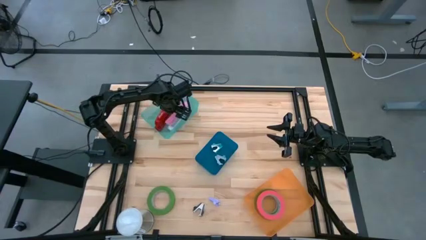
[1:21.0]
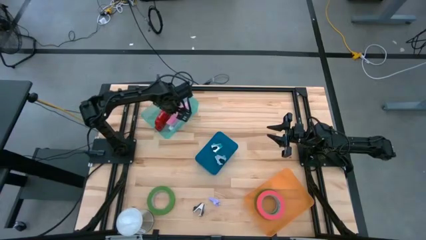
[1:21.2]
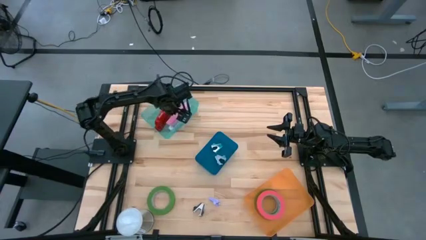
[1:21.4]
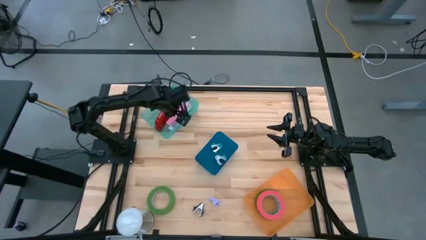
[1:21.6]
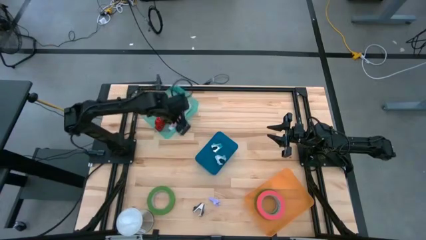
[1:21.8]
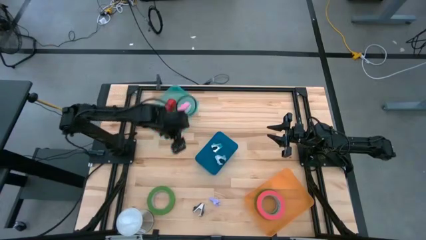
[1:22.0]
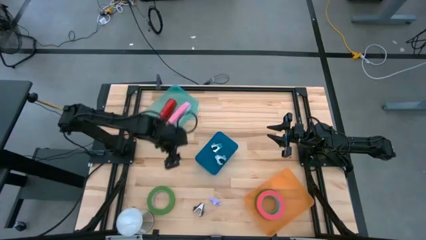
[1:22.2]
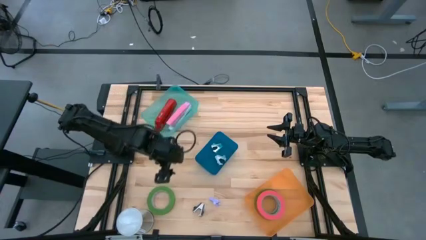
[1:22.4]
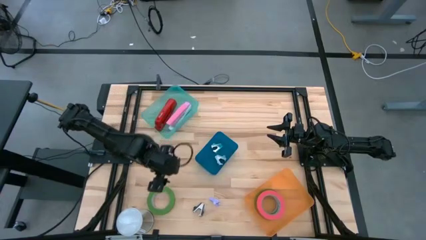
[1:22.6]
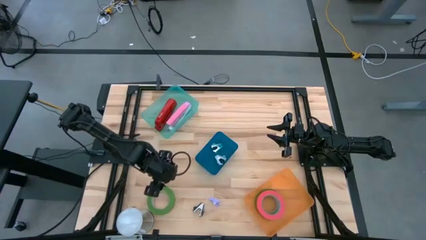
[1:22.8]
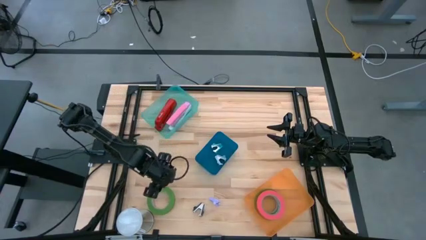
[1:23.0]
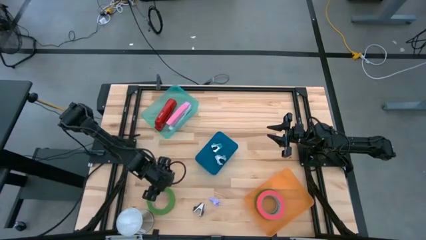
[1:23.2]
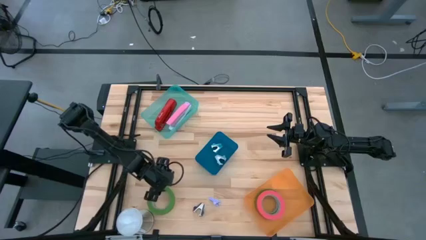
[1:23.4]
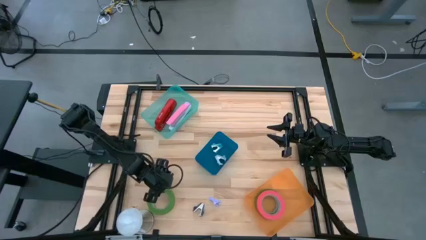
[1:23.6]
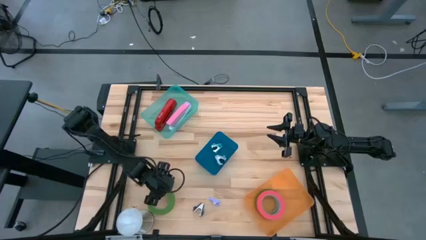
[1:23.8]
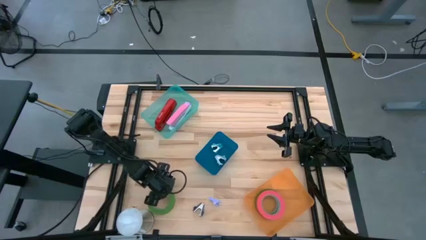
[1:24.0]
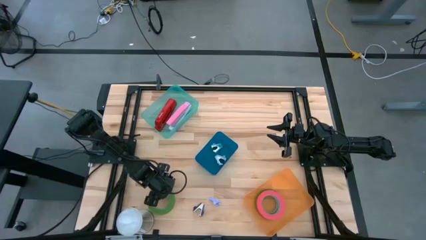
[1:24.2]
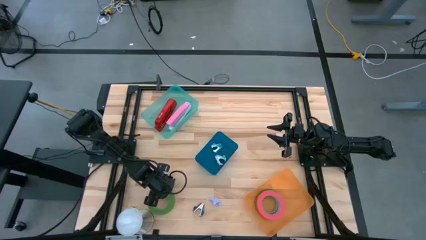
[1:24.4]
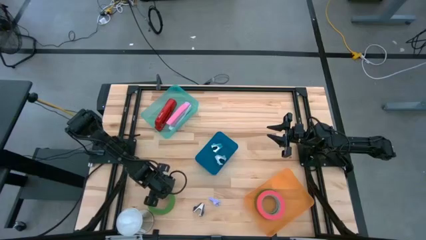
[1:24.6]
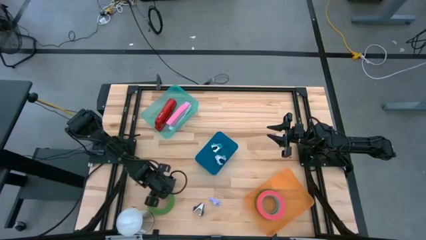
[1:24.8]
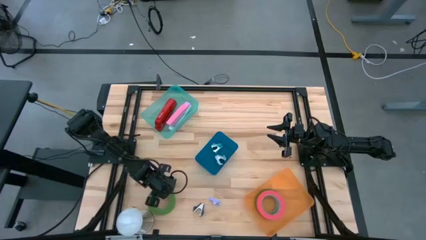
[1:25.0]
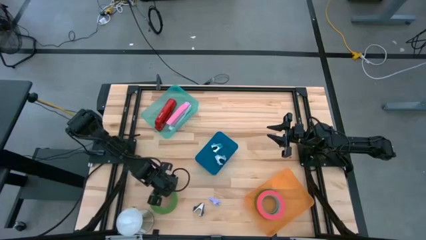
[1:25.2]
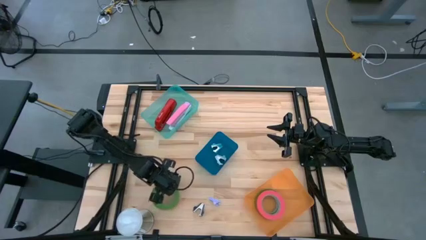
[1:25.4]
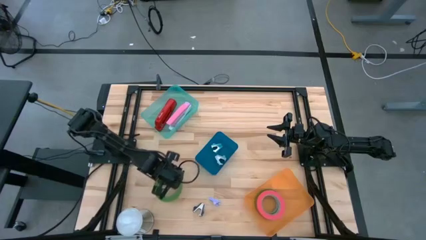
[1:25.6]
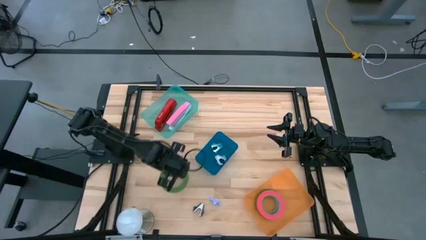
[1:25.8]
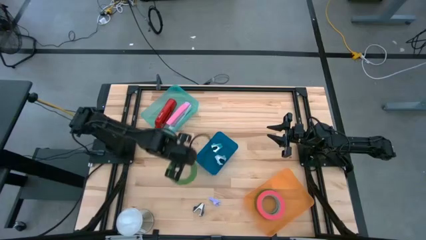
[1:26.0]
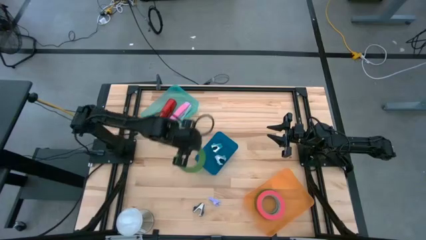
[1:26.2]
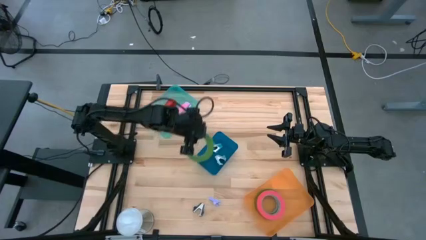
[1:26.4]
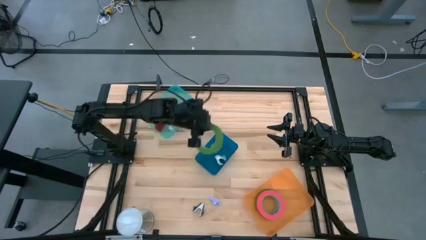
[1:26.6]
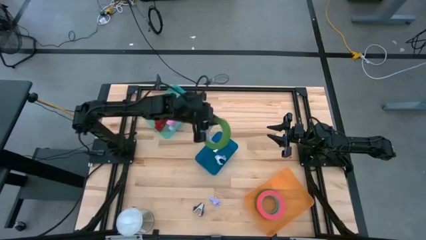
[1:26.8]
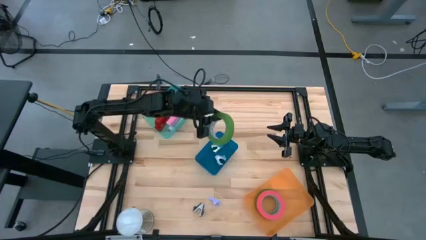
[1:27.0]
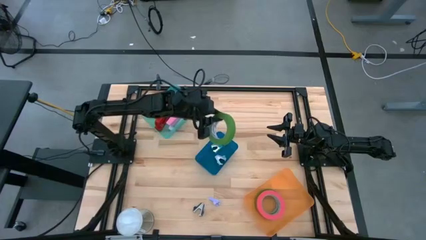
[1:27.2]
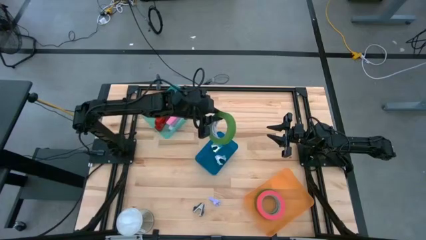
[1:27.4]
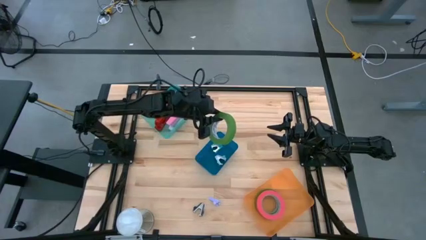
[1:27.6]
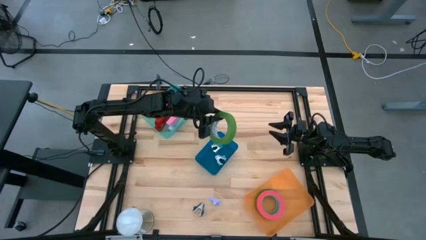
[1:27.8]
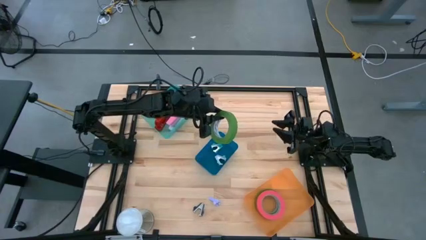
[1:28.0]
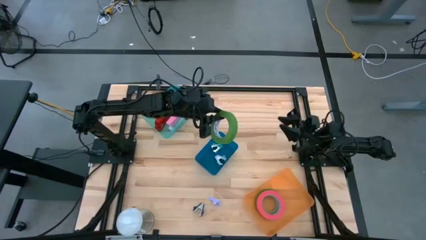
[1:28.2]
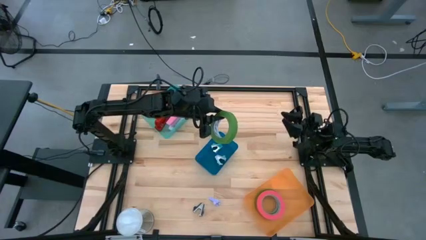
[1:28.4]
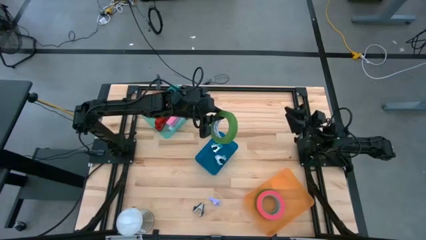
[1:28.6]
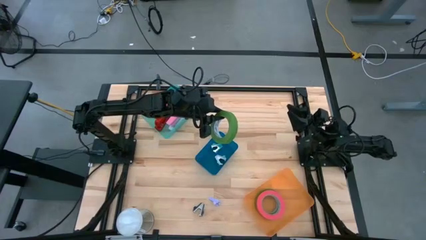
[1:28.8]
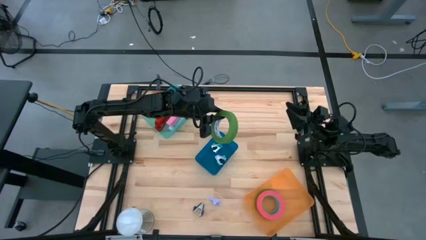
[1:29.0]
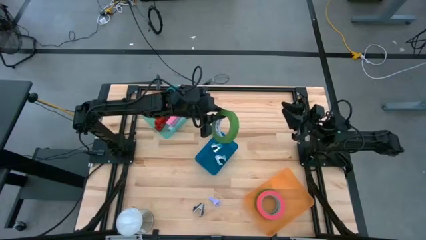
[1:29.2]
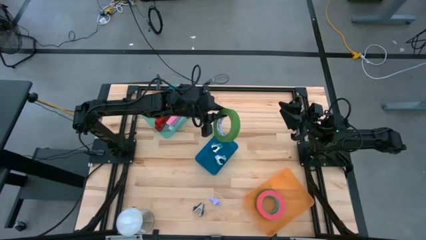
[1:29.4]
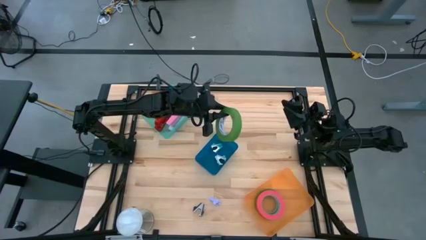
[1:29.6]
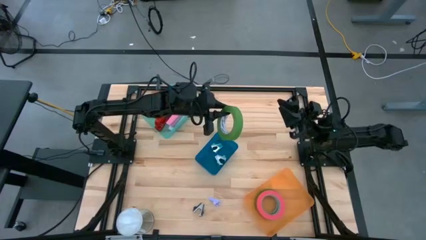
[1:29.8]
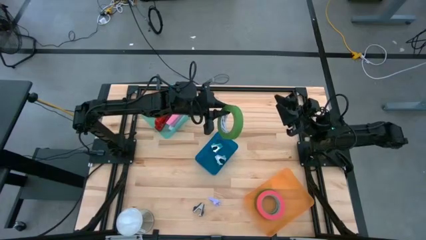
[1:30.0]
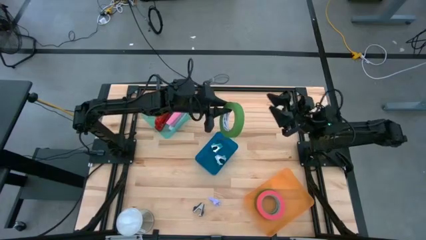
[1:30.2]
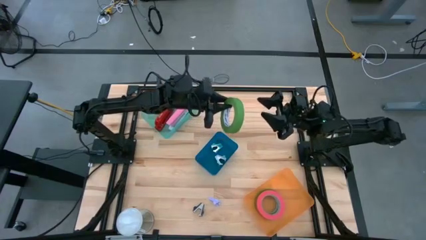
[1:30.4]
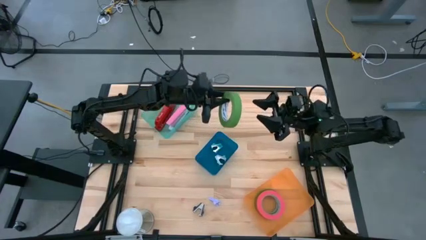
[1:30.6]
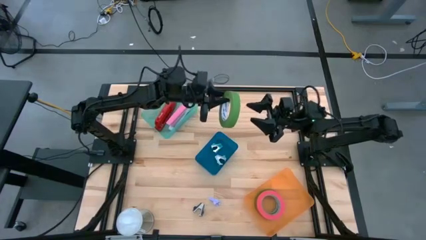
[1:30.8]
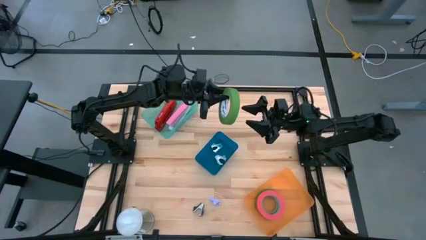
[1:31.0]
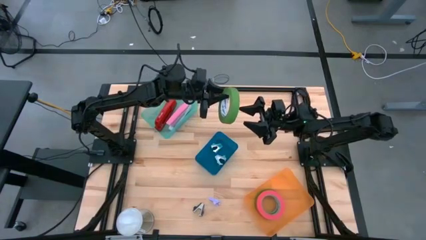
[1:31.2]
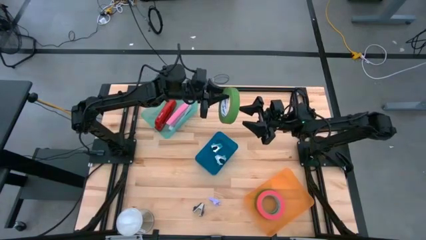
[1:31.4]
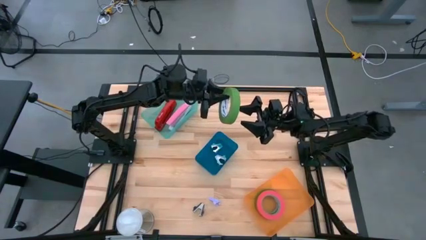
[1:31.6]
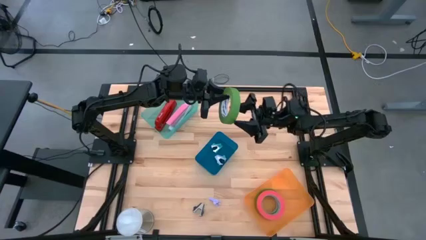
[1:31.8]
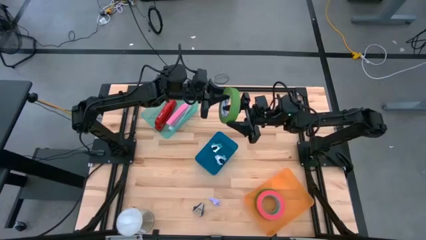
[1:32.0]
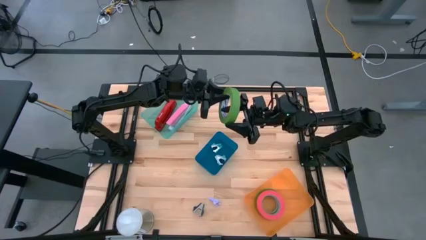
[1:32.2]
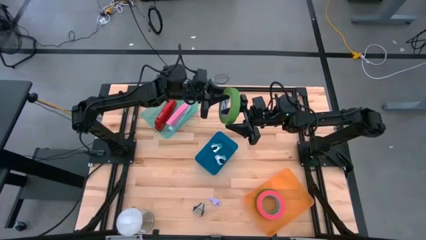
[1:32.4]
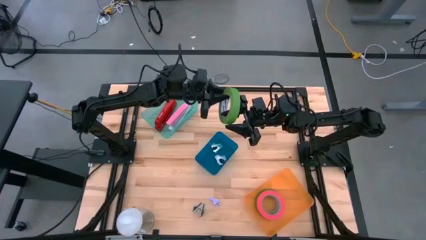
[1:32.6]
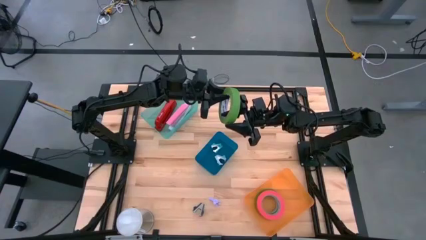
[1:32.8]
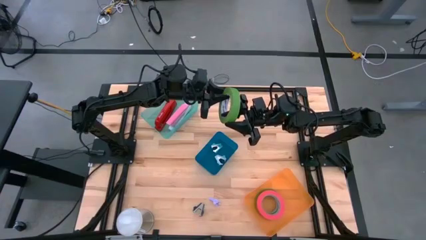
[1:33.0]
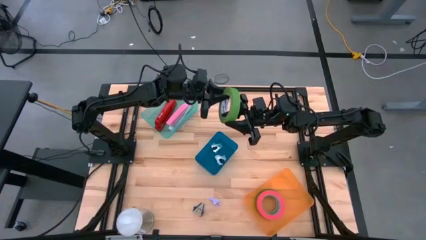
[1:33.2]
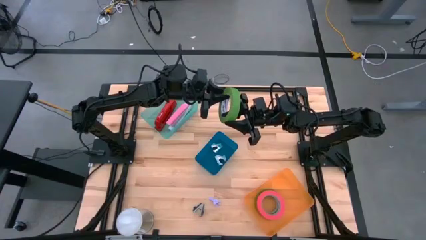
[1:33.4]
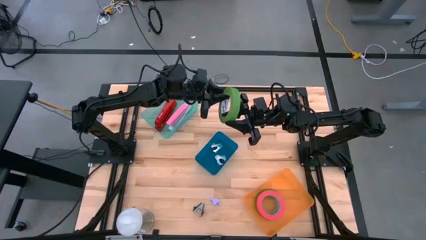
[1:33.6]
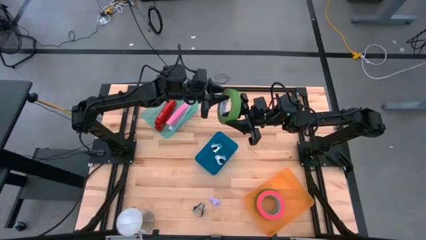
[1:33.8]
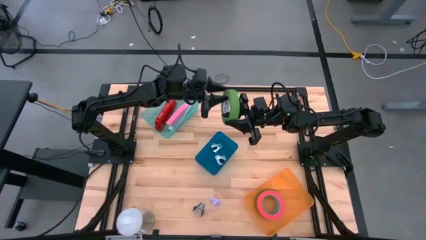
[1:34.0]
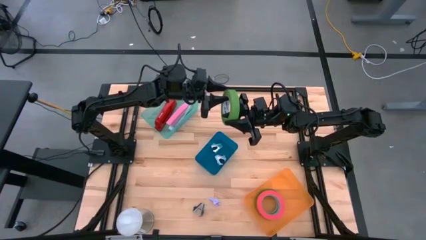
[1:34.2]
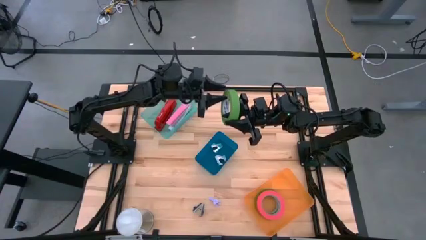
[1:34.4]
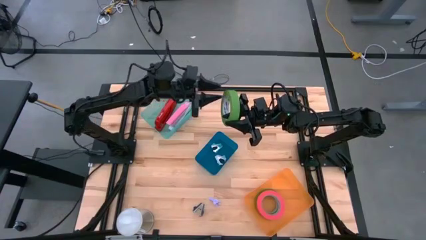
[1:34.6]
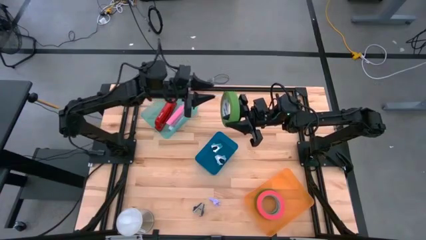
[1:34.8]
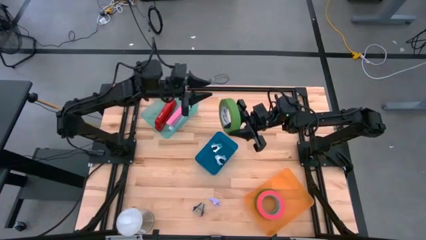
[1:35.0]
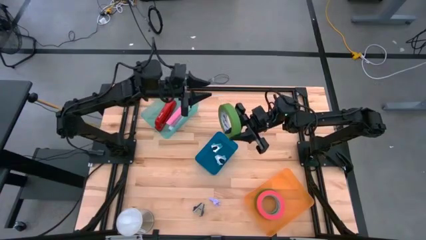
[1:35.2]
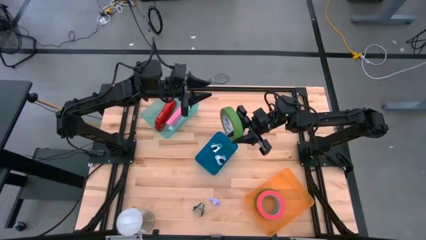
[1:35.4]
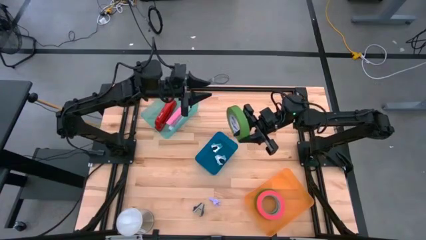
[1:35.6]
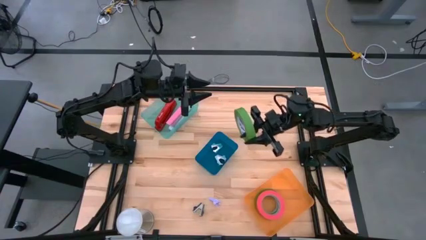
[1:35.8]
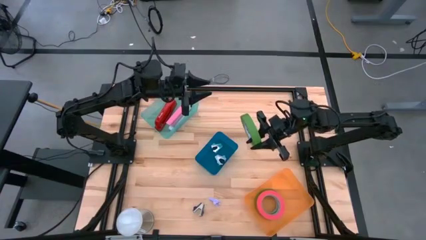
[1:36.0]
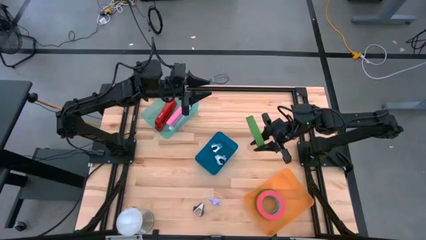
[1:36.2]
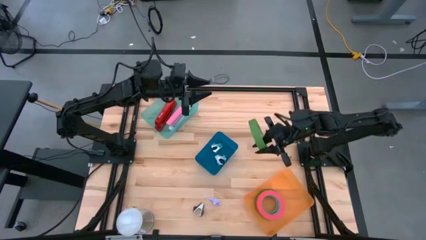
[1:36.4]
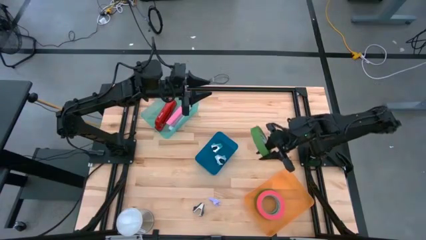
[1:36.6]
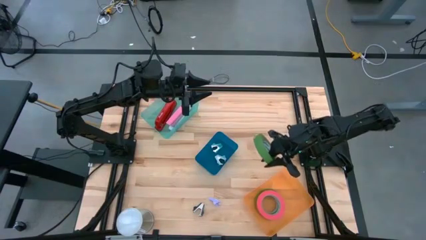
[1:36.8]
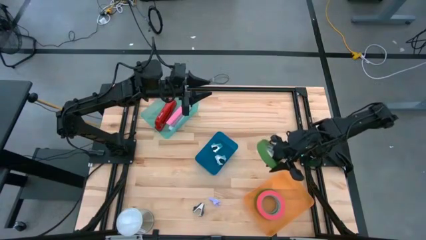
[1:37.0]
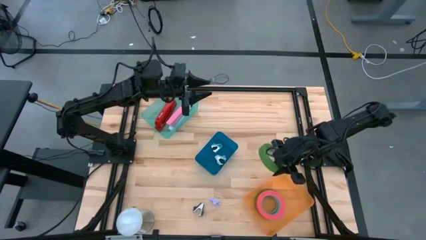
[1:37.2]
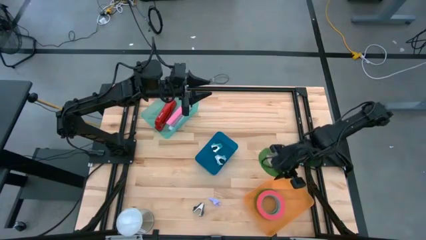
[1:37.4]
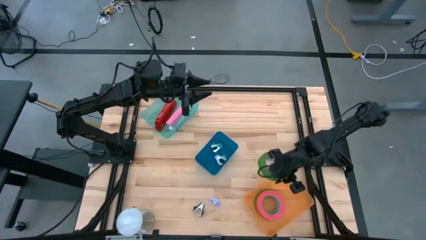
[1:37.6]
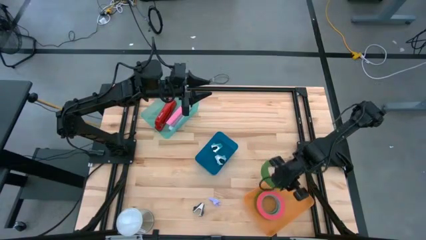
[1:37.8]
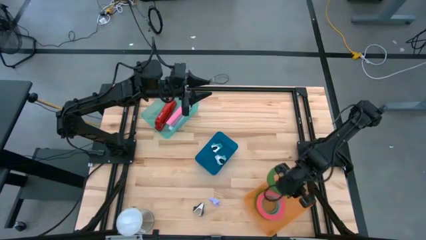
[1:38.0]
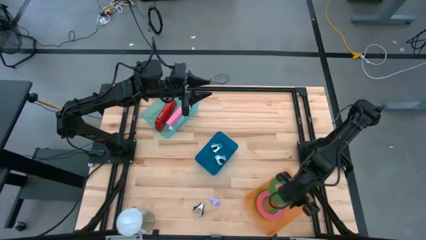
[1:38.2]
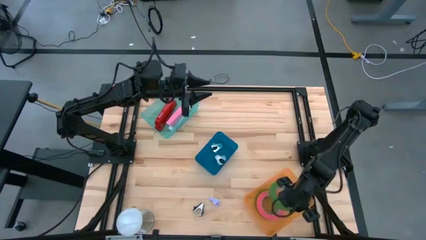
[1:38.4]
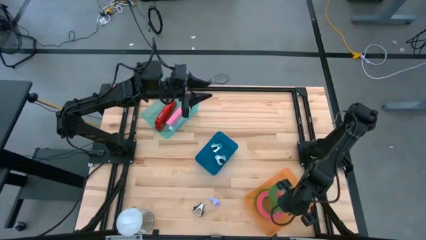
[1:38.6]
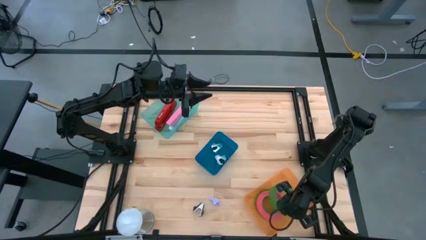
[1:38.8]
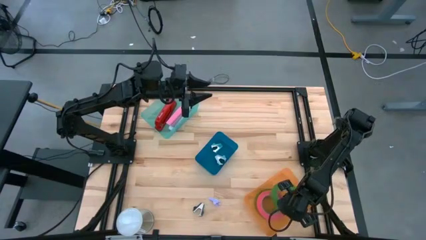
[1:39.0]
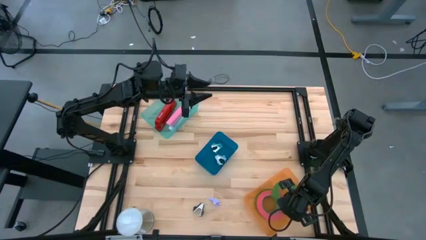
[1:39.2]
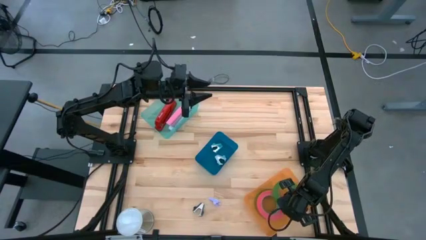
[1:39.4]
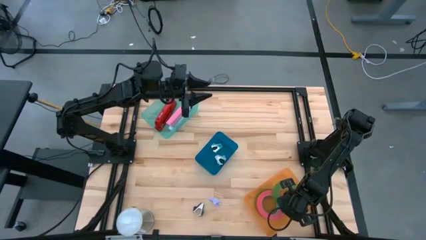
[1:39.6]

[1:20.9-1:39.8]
Task: Pick and place Stapler, Stapler remover, tape
Put the green tape into the orange bin
